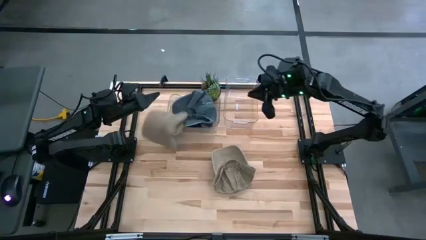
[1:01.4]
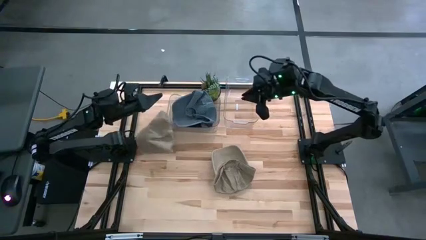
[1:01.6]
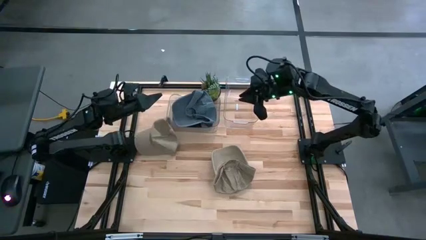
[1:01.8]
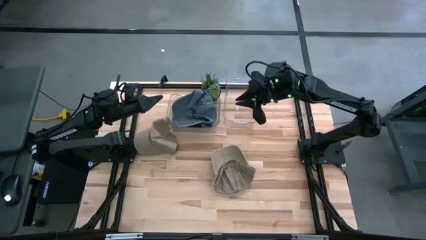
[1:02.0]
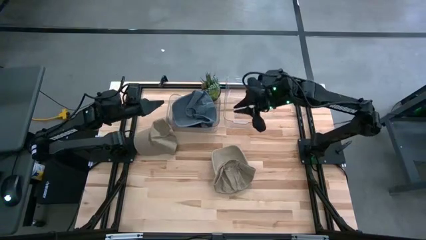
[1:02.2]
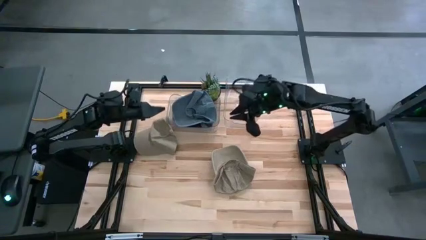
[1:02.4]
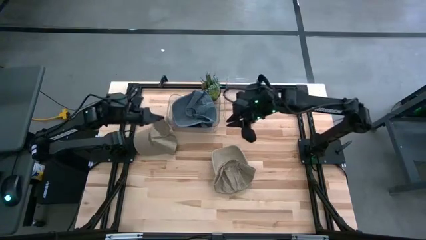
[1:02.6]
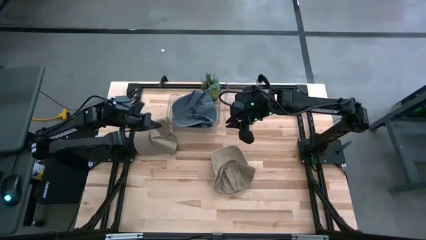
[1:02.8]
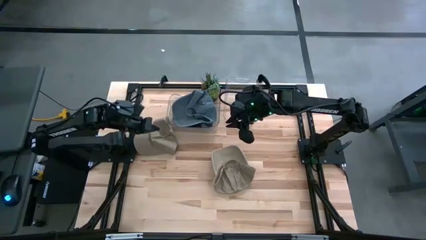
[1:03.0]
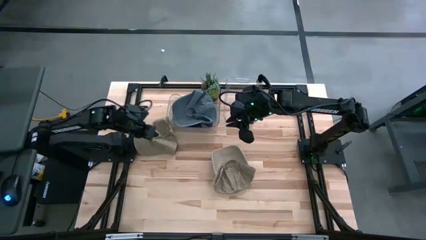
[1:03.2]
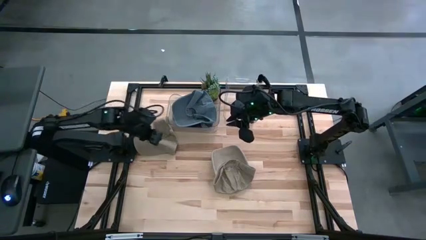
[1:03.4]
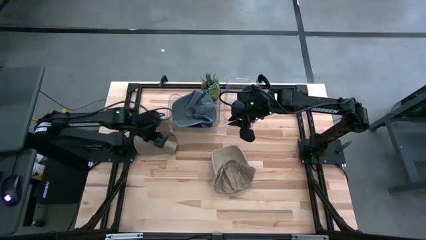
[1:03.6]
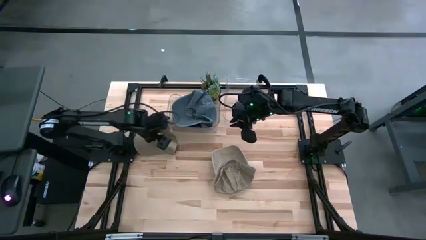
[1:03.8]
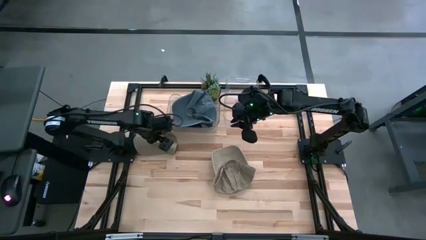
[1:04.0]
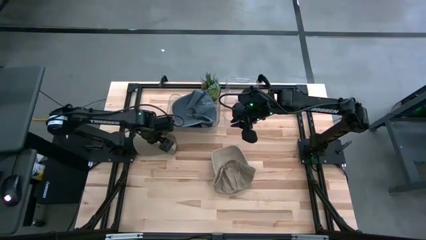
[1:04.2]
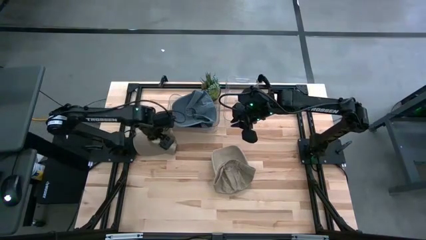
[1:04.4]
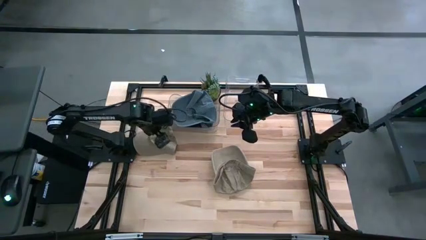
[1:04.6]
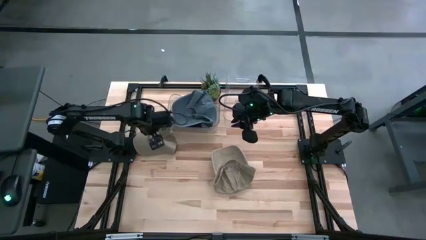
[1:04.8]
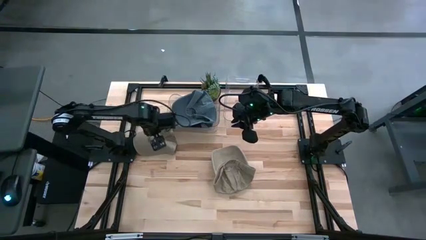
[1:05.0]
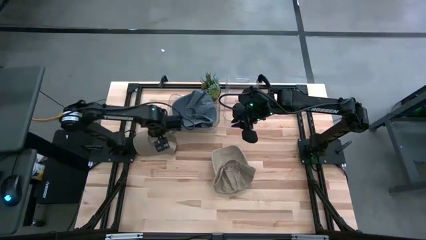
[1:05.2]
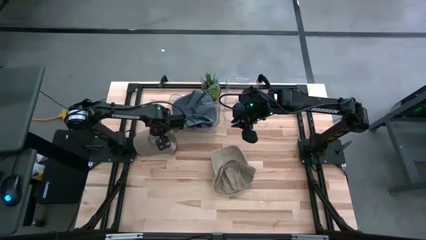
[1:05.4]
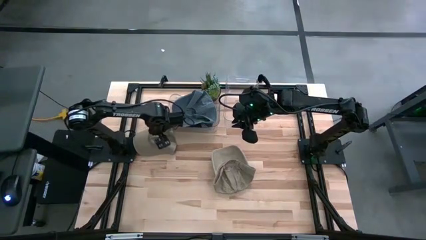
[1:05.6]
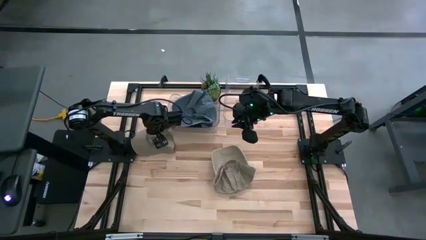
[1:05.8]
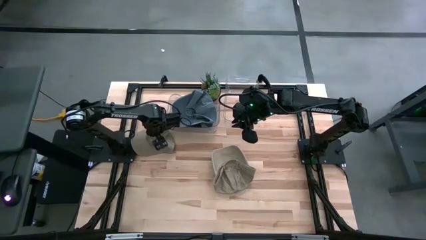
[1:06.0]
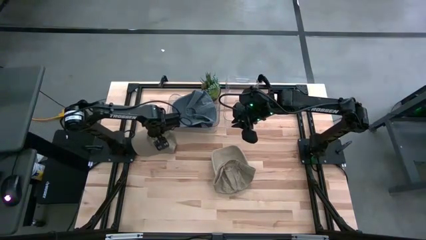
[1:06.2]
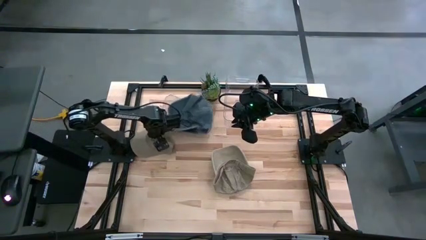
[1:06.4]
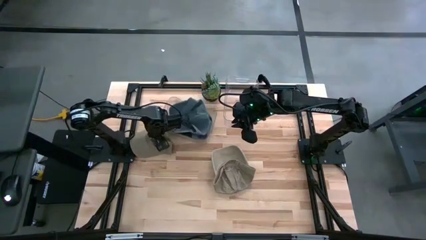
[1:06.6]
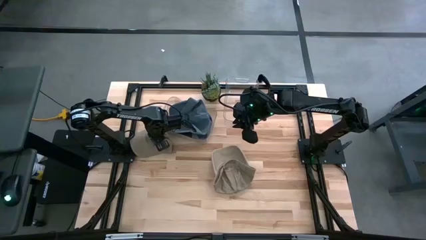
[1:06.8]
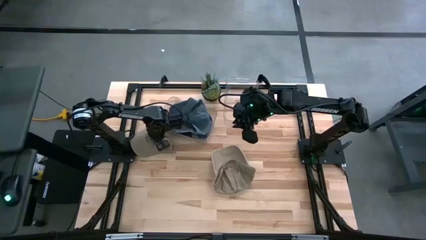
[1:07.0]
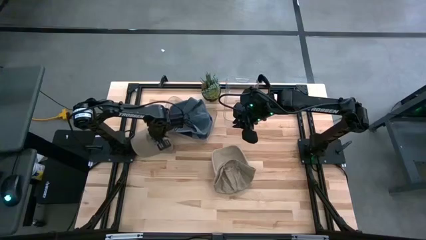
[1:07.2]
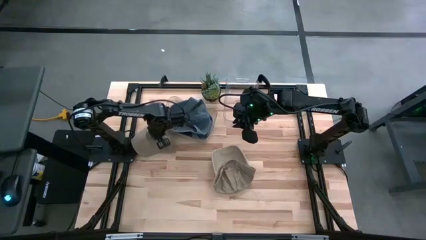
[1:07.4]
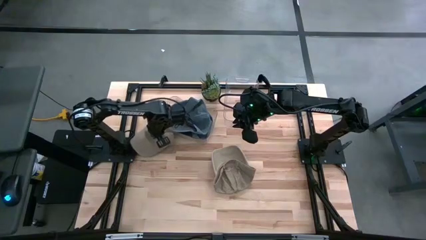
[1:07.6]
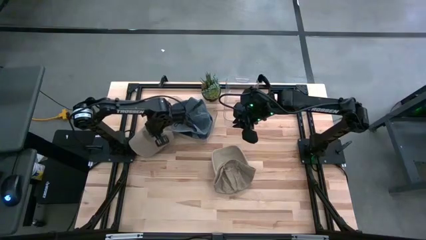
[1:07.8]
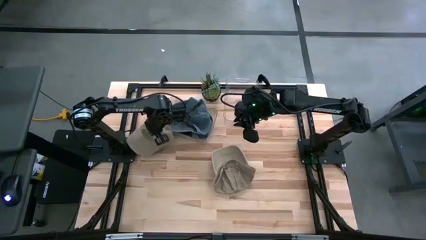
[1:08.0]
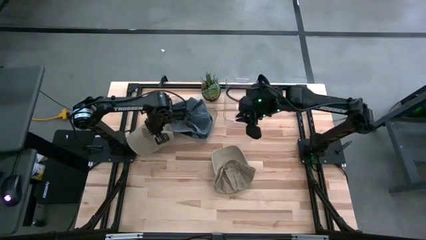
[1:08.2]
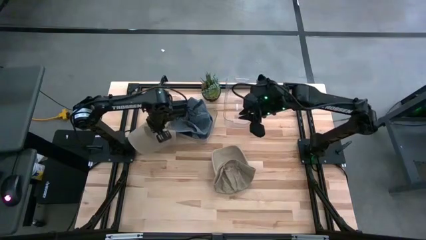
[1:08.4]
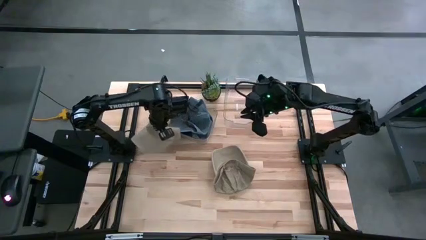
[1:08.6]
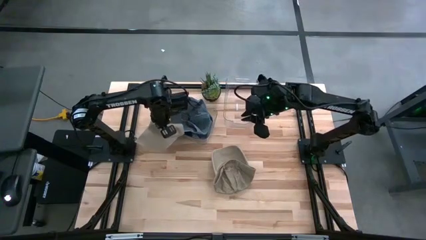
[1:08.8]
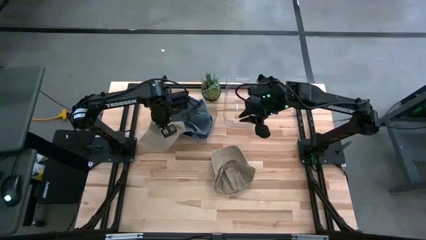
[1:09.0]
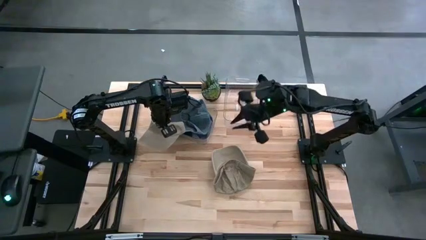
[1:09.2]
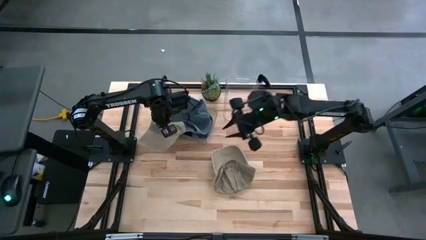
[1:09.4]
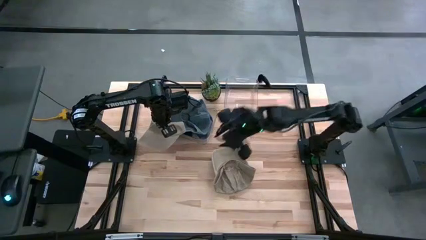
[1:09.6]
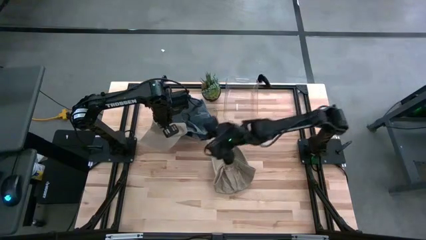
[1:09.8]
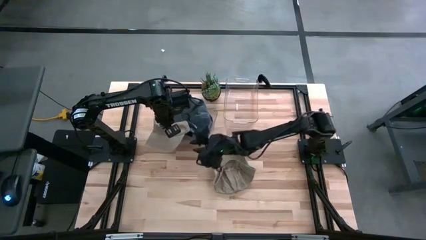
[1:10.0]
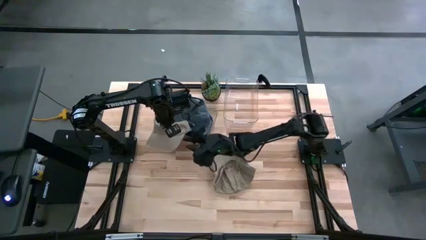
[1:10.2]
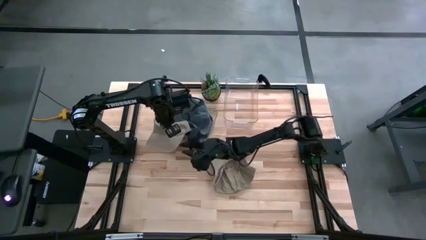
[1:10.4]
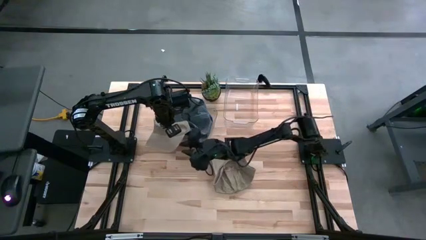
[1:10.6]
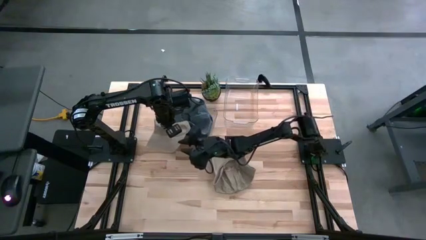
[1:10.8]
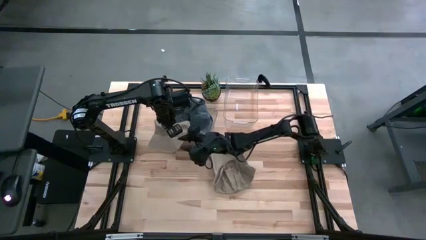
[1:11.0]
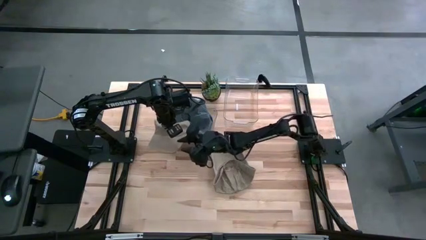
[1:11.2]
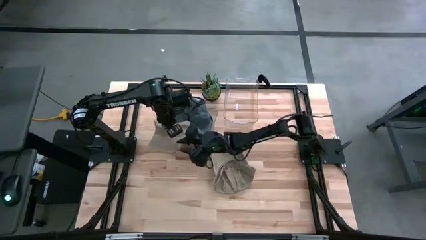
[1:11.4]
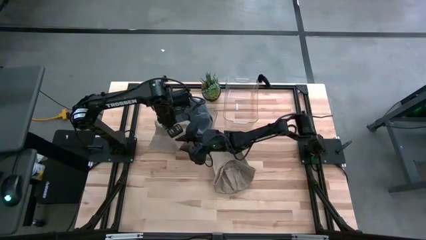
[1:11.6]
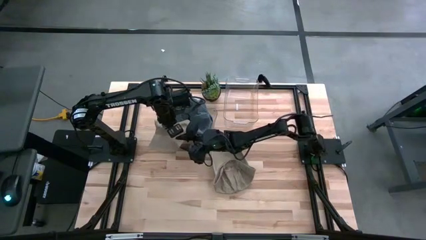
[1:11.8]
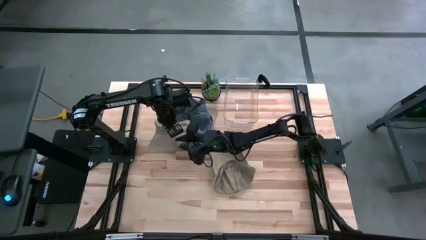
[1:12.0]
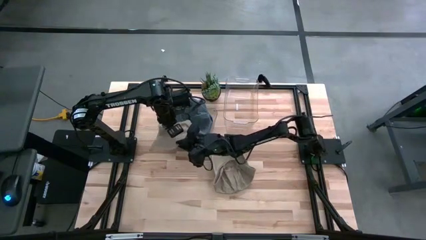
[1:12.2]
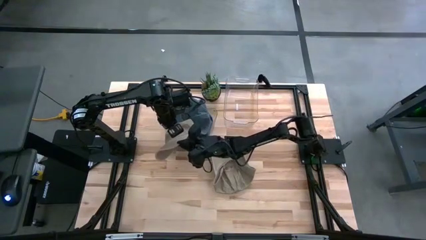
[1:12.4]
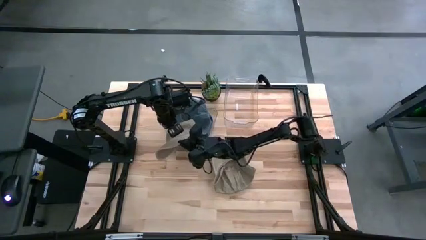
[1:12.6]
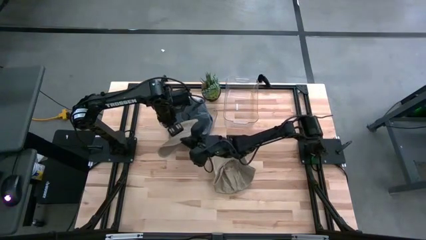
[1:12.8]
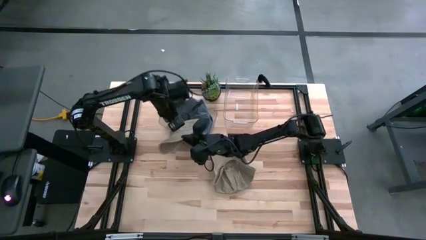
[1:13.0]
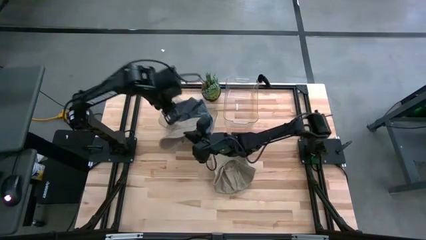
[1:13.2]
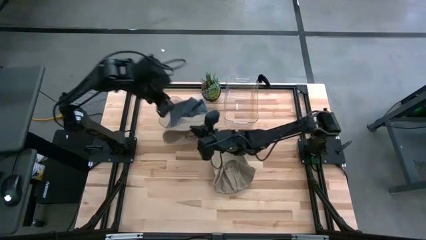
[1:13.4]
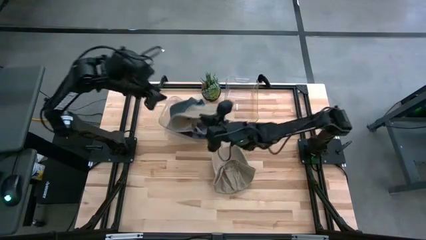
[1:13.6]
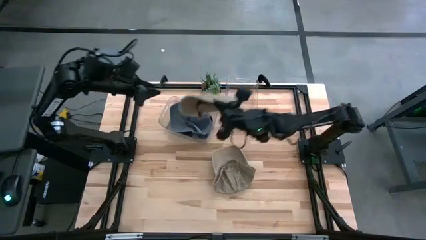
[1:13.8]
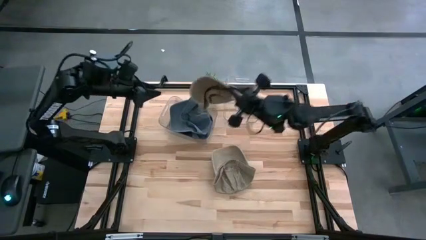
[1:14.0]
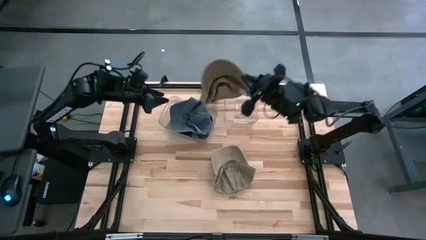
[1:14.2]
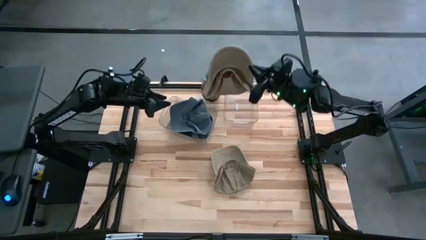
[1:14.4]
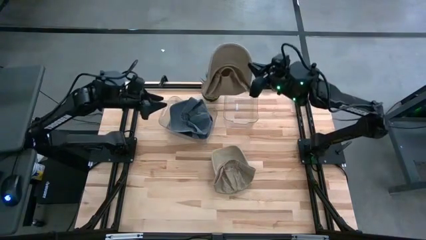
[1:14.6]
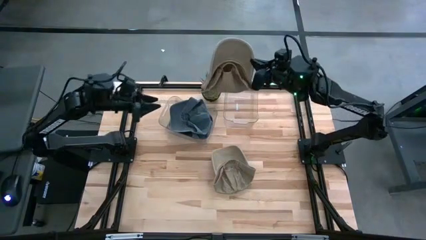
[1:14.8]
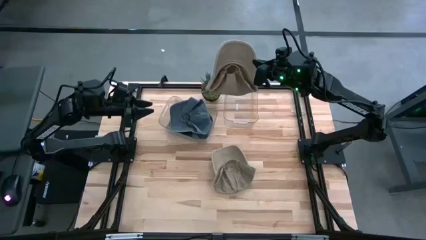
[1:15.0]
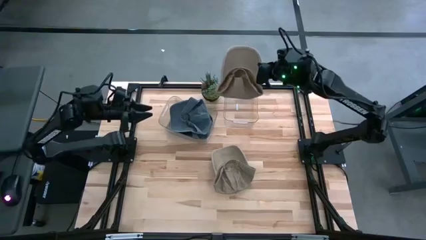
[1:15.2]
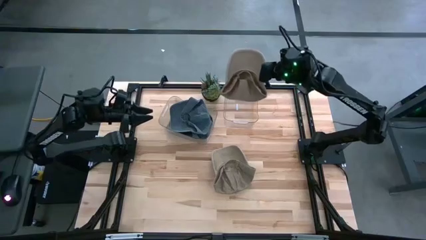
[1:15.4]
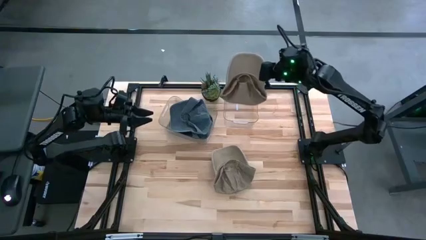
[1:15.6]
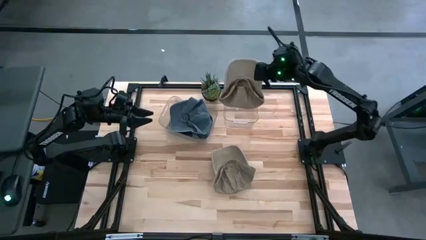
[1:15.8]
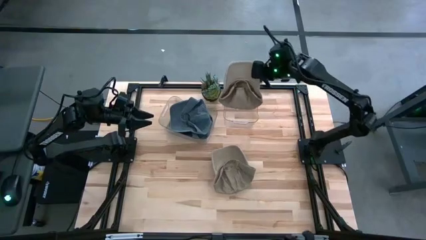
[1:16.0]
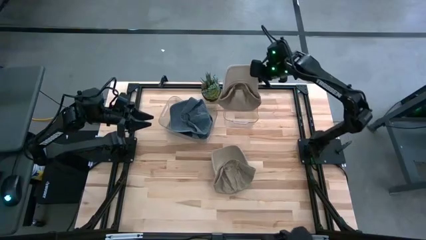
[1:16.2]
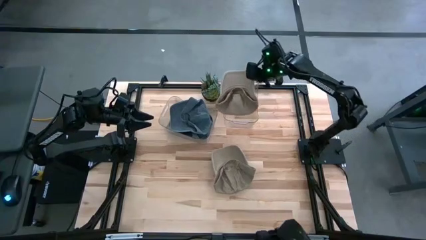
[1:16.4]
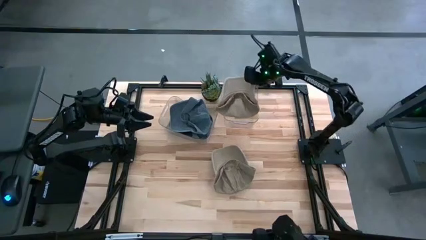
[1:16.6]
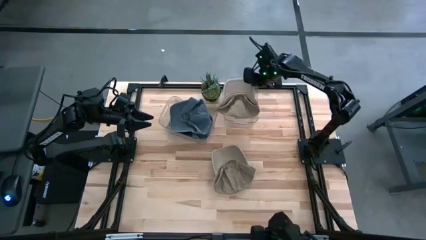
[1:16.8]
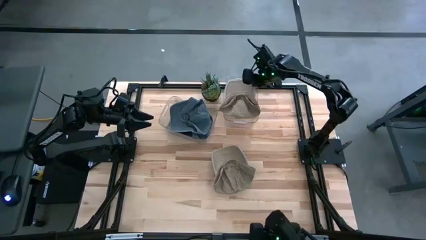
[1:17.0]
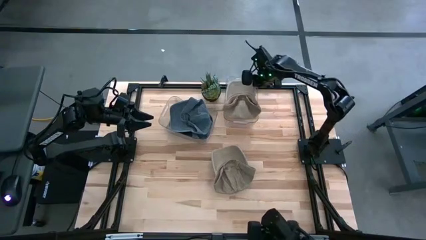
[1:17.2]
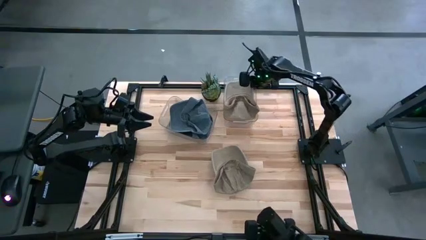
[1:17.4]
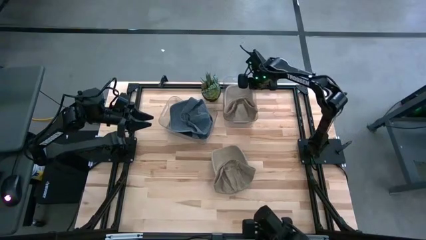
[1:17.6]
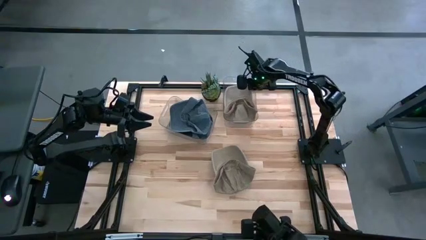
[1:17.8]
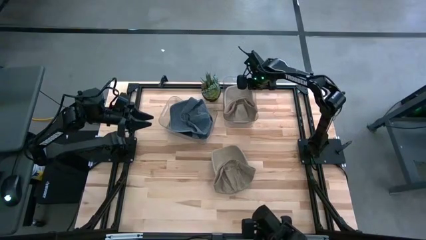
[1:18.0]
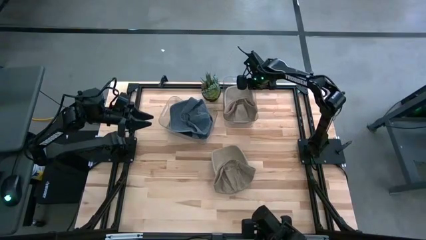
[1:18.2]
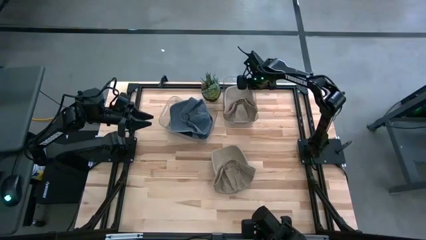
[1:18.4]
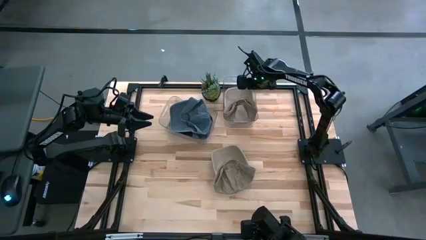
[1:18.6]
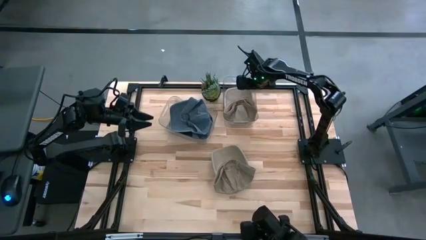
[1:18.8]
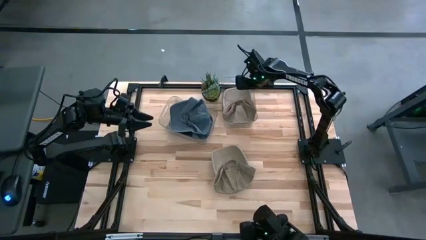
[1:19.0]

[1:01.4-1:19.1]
Task: Pick & Place hat
Put the top brown cap into the right transparent bin
